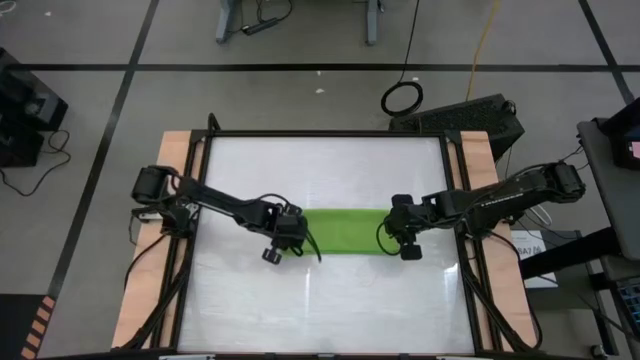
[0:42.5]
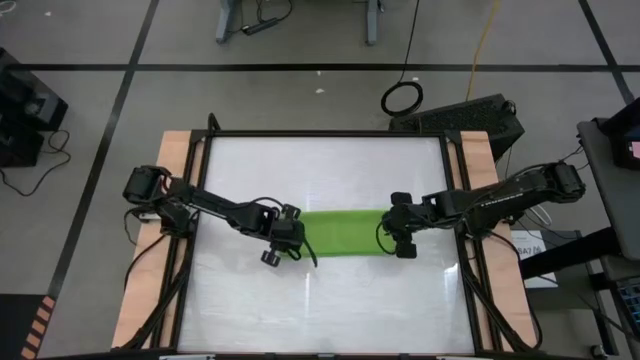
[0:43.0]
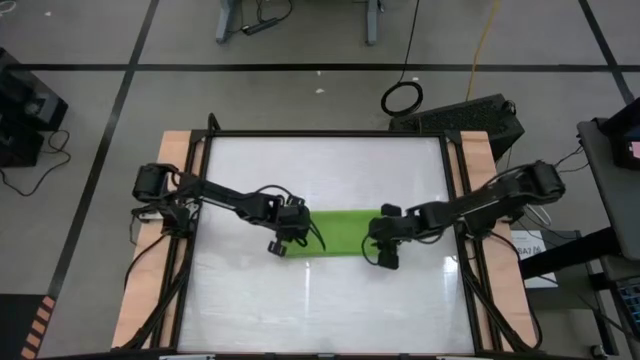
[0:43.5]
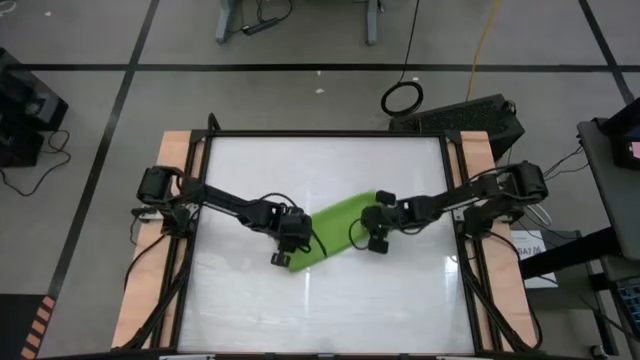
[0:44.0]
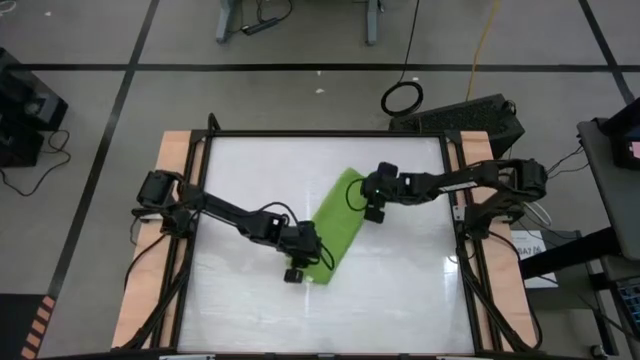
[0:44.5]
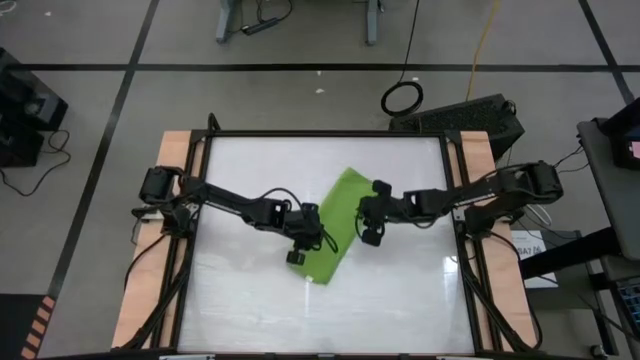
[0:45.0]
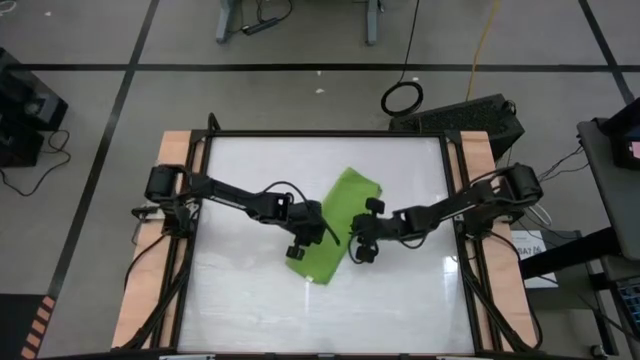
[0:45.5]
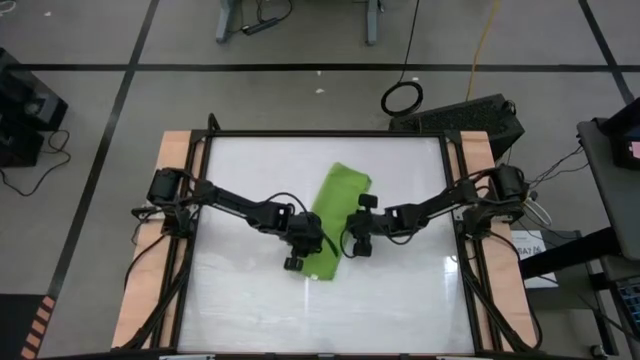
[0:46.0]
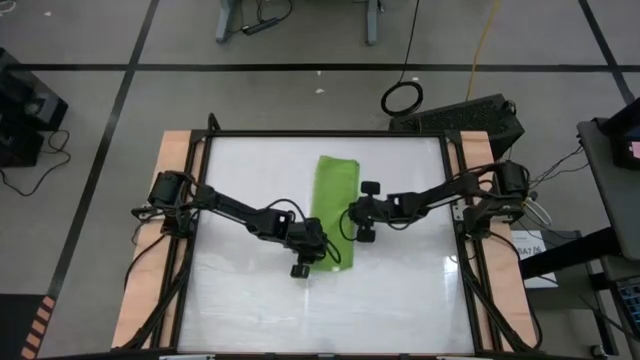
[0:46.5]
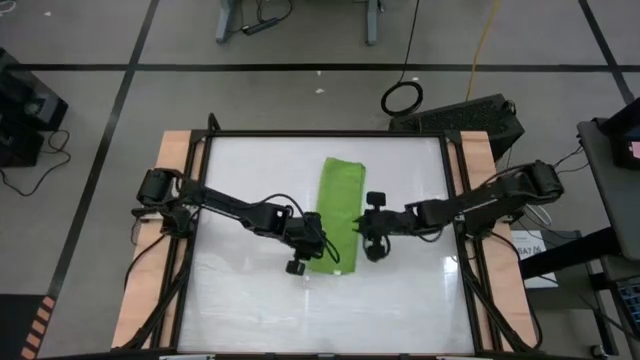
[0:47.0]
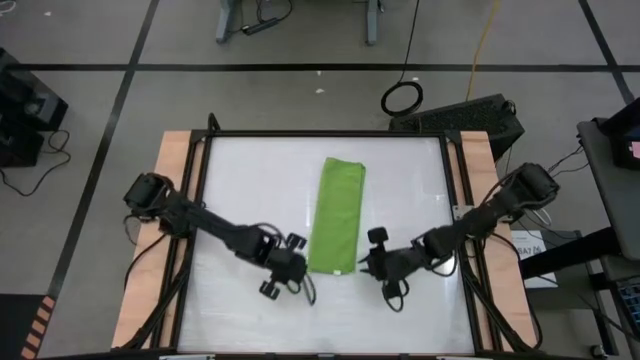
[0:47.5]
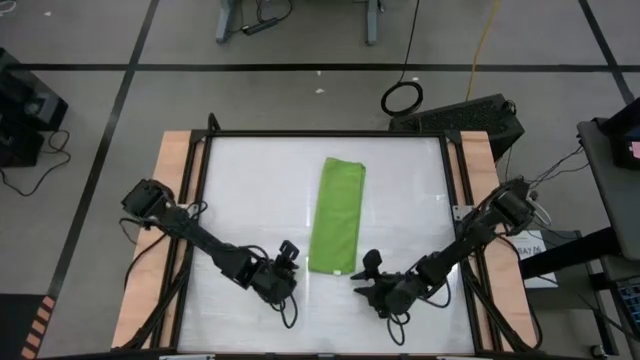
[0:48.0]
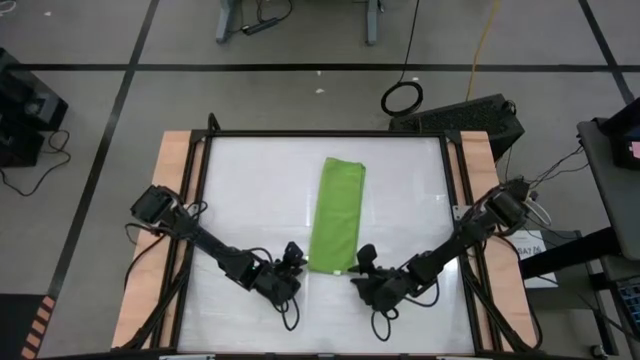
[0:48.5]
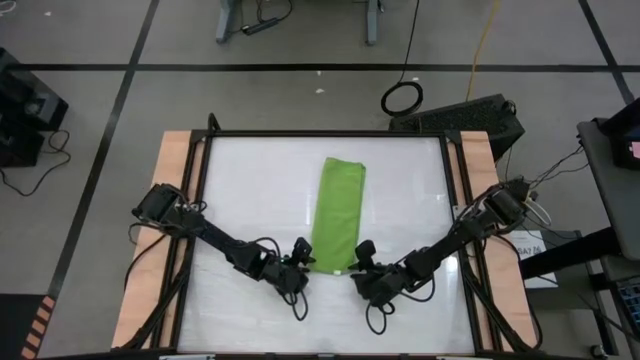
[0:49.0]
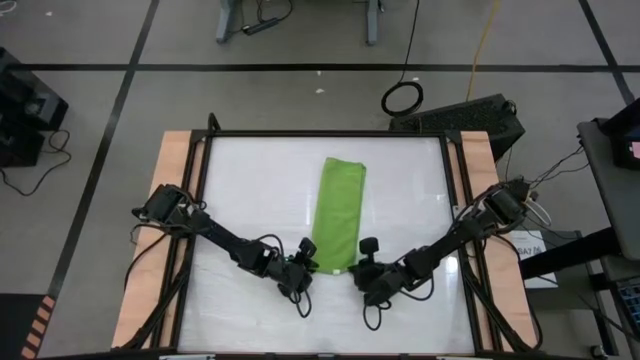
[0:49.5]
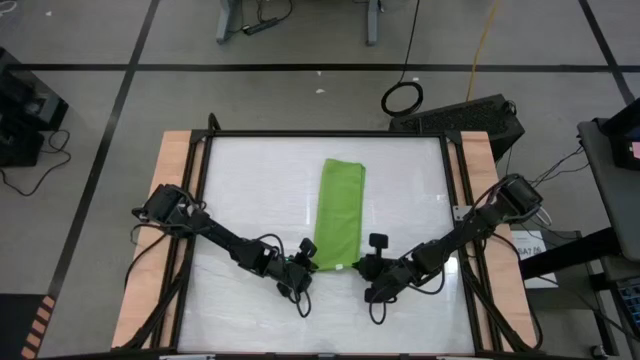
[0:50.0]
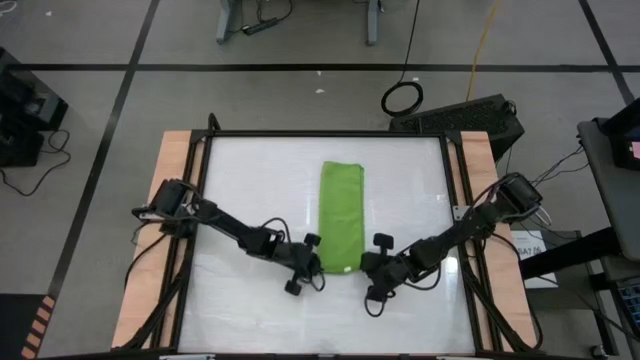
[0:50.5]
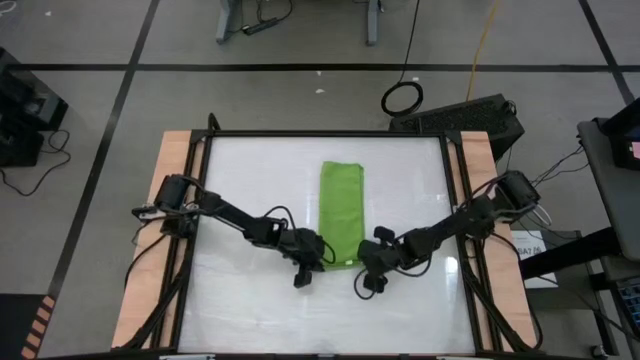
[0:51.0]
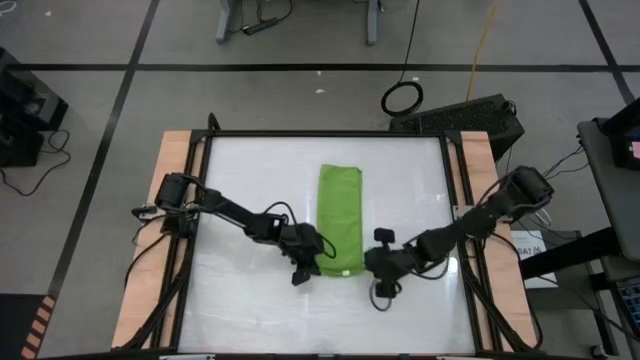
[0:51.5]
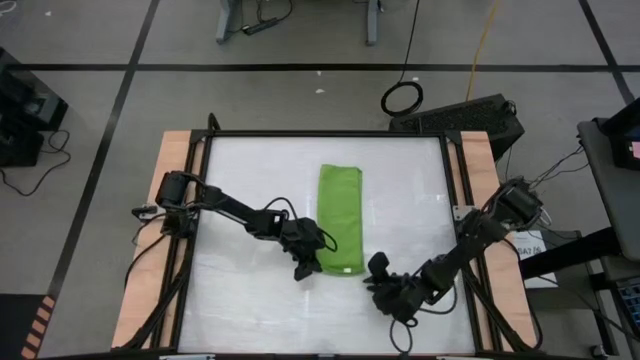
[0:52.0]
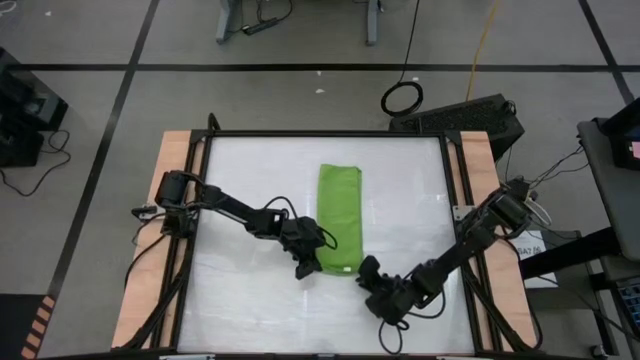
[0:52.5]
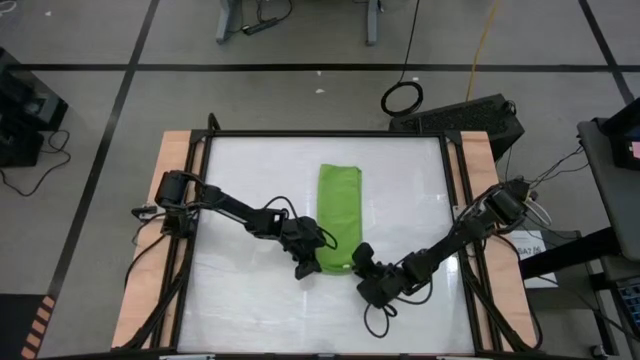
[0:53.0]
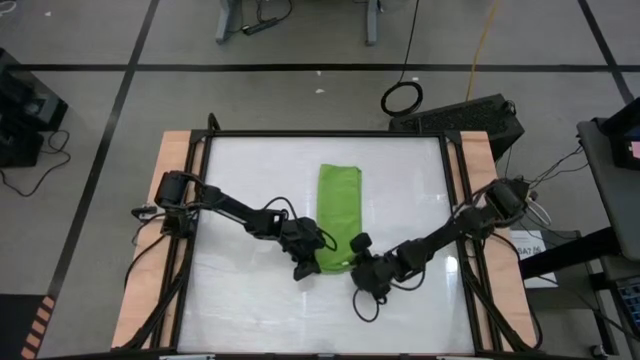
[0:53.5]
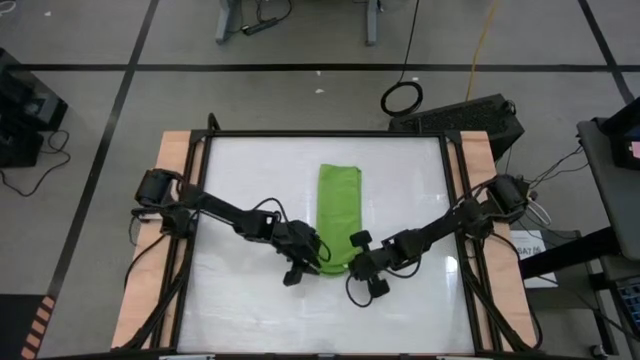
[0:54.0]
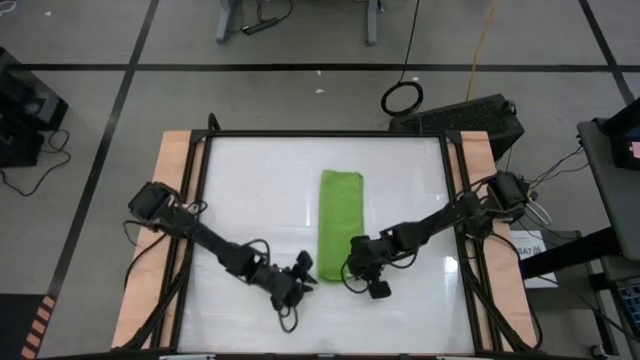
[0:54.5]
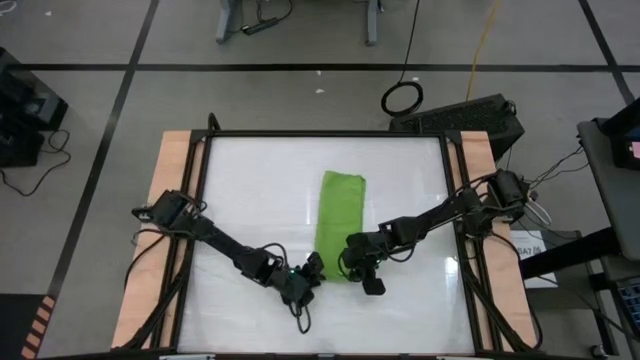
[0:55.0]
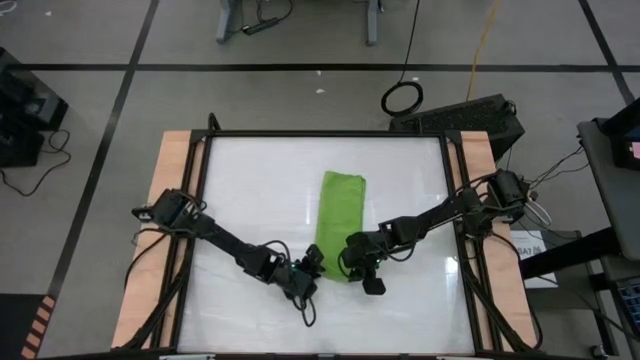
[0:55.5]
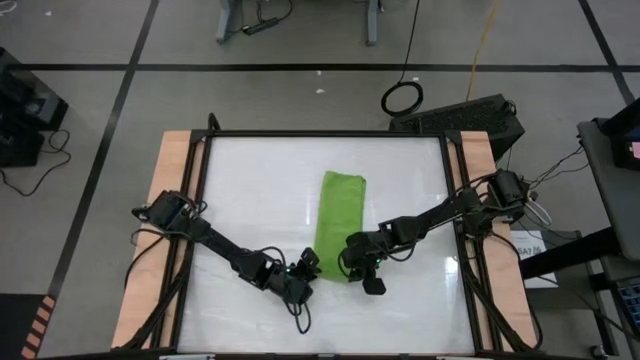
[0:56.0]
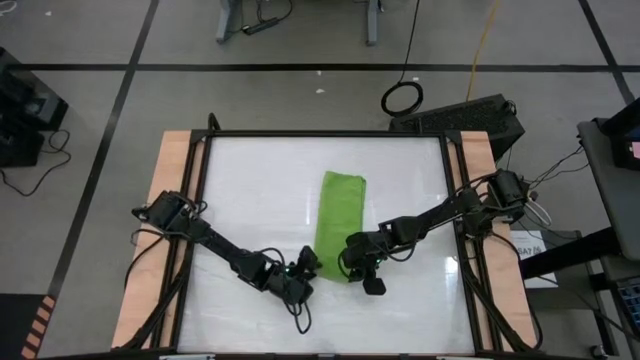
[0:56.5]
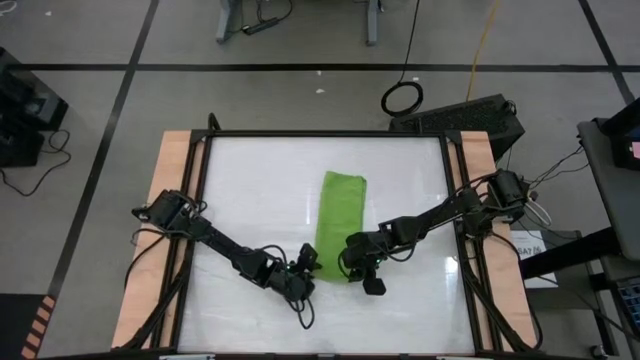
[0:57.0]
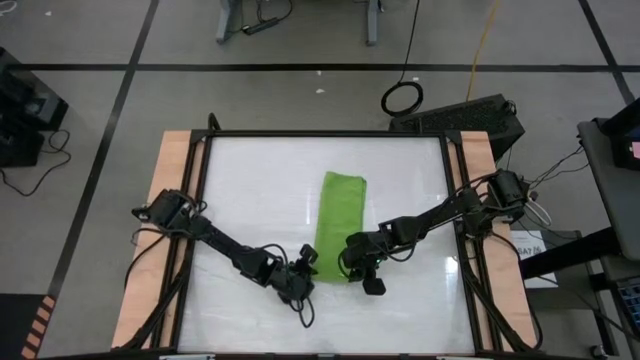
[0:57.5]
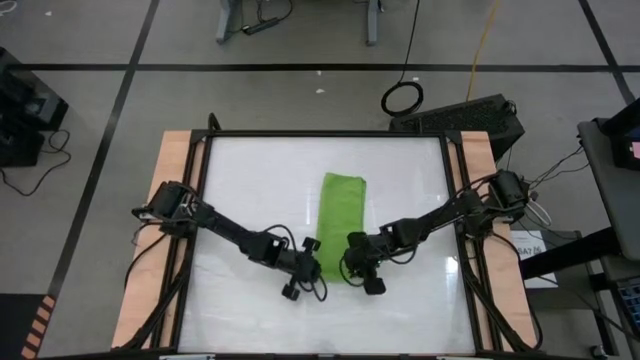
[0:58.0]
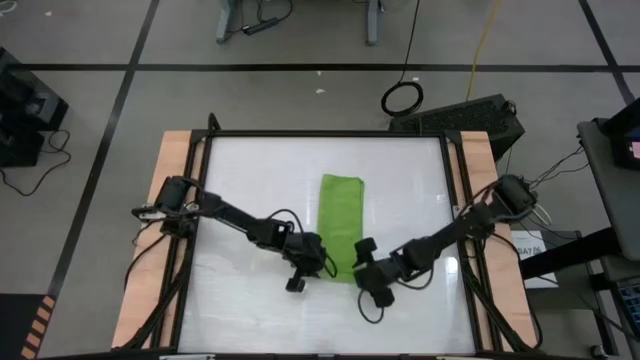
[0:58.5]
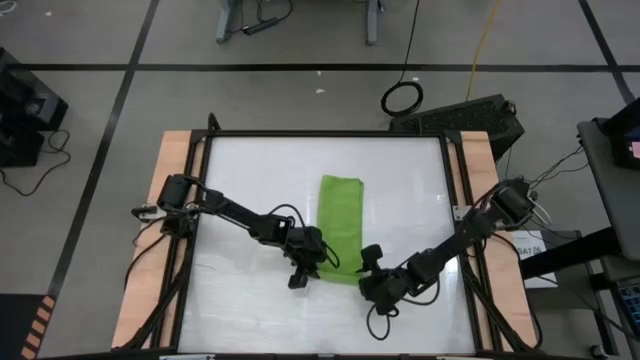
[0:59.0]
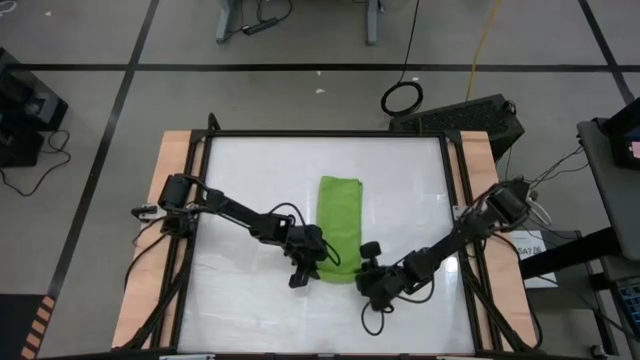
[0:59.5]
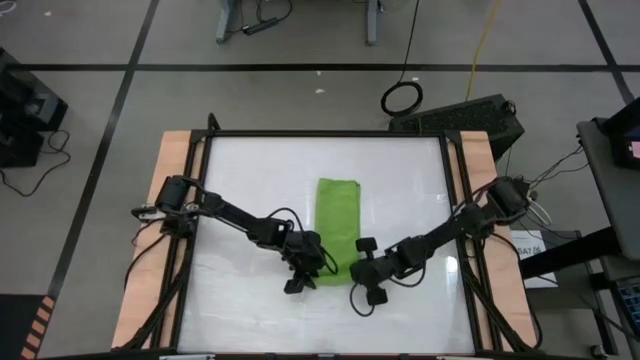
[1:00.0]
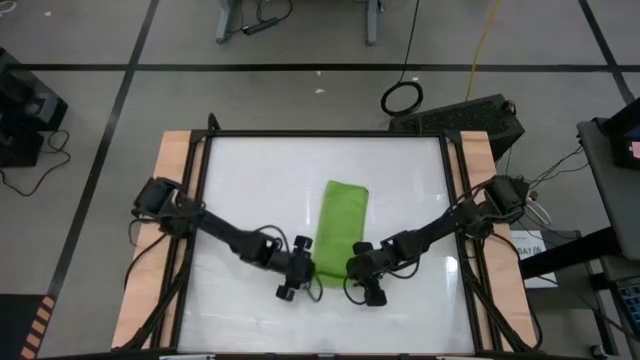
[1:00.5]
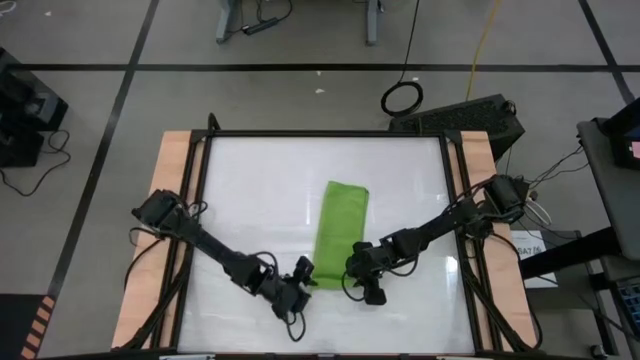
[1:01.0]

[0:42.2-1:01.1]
Task: Roll towel
Roll the green towel on the table
